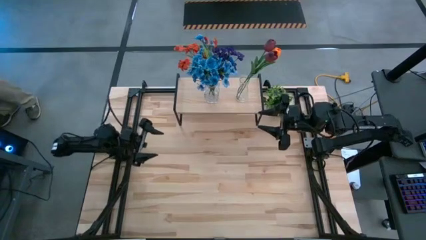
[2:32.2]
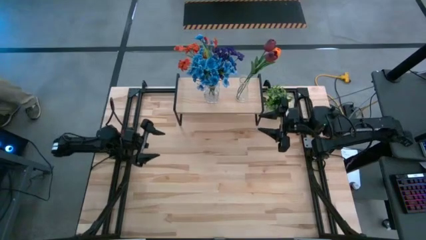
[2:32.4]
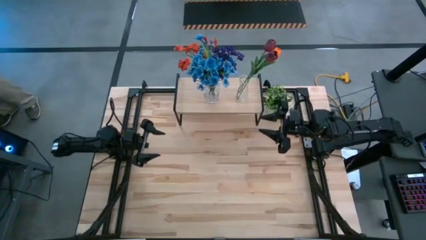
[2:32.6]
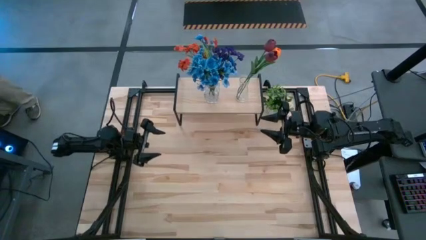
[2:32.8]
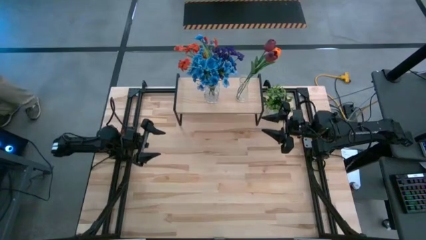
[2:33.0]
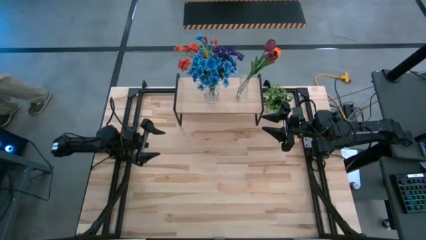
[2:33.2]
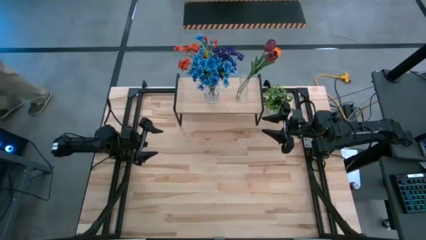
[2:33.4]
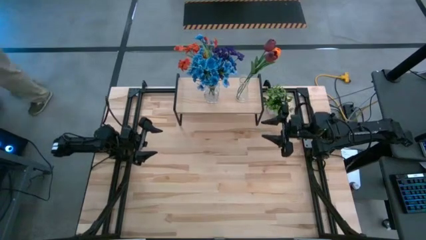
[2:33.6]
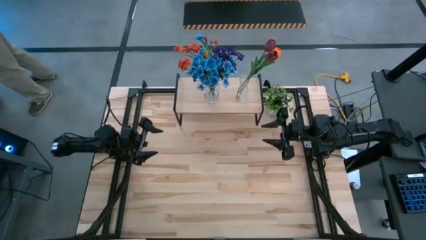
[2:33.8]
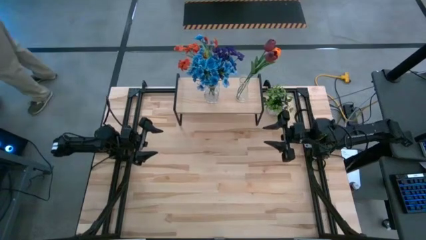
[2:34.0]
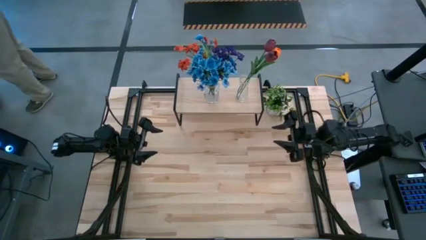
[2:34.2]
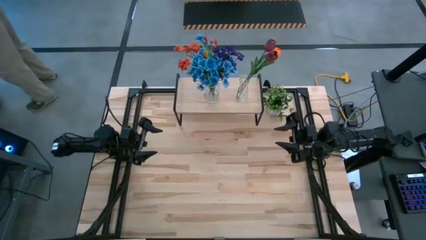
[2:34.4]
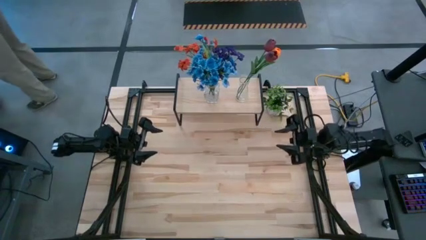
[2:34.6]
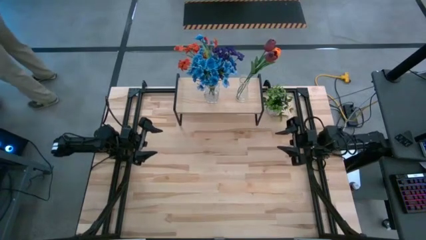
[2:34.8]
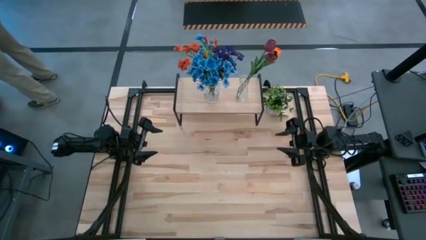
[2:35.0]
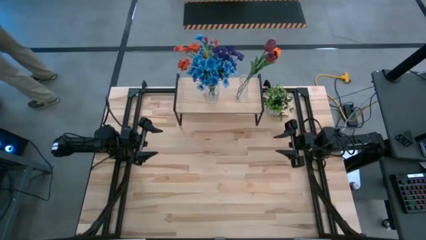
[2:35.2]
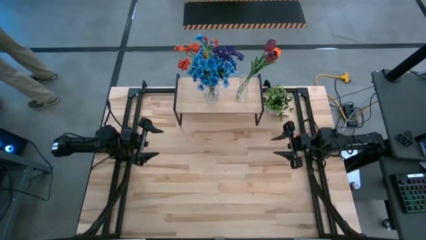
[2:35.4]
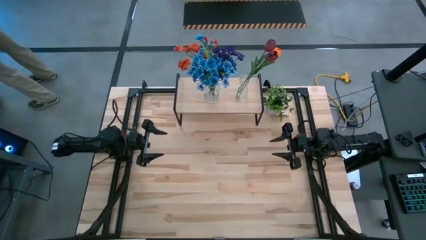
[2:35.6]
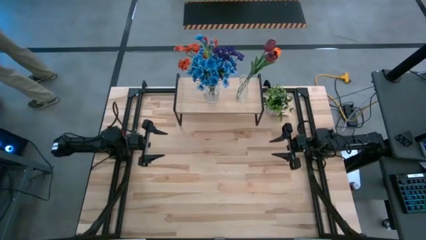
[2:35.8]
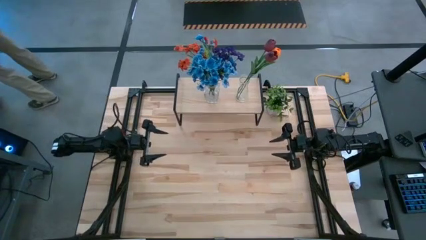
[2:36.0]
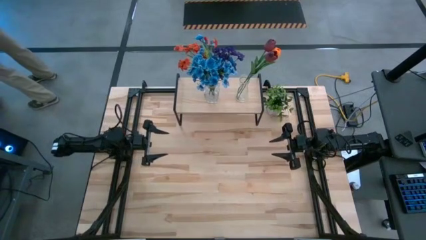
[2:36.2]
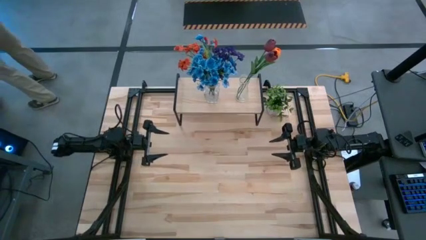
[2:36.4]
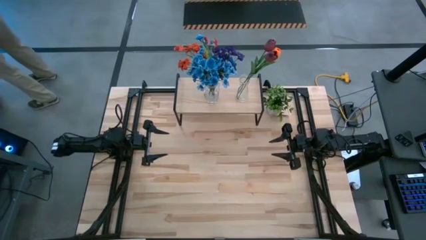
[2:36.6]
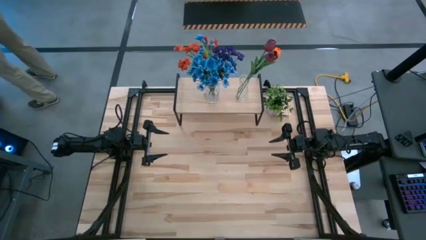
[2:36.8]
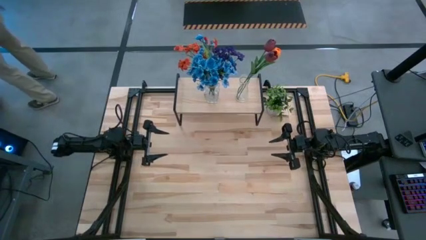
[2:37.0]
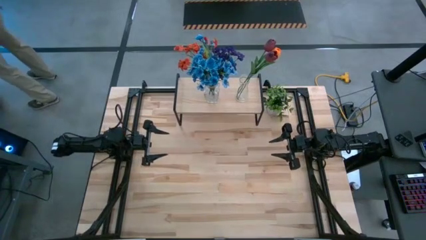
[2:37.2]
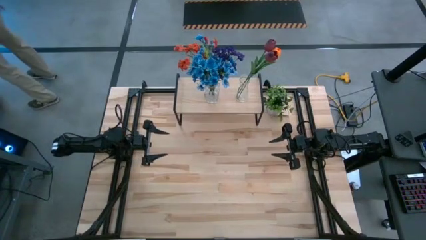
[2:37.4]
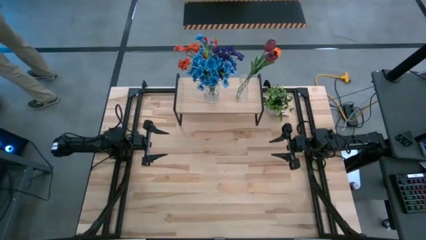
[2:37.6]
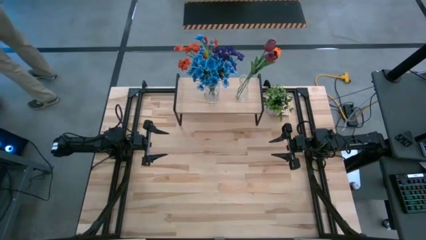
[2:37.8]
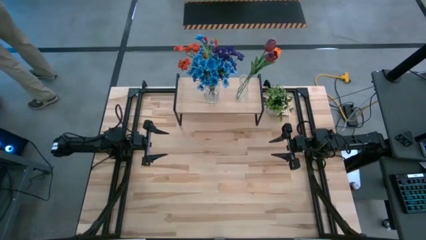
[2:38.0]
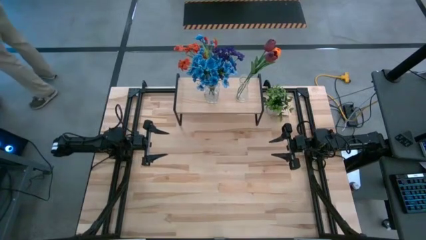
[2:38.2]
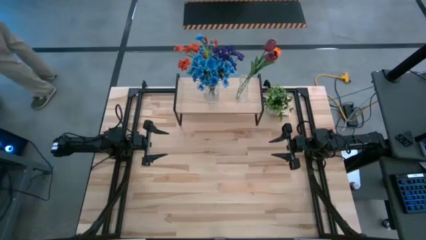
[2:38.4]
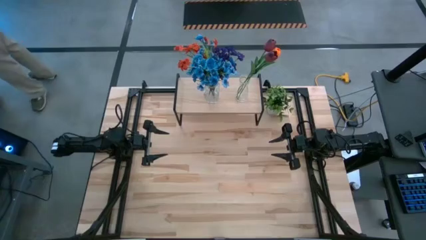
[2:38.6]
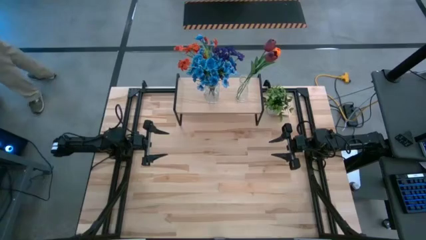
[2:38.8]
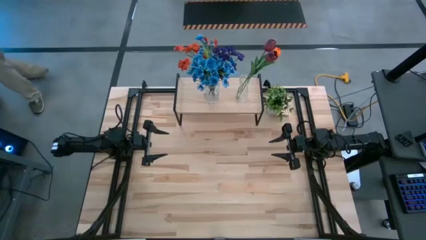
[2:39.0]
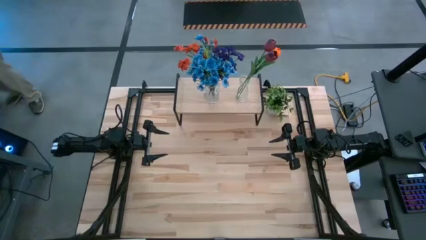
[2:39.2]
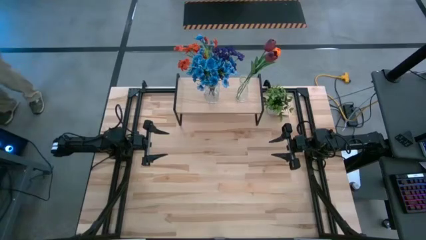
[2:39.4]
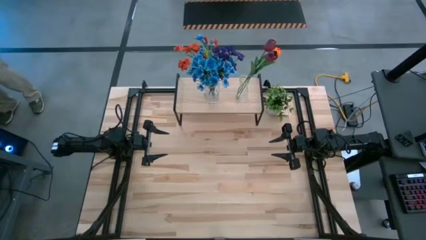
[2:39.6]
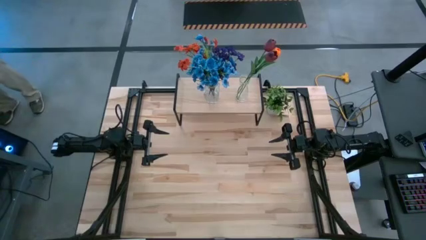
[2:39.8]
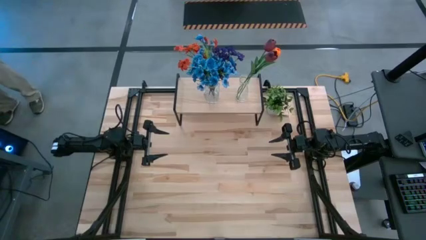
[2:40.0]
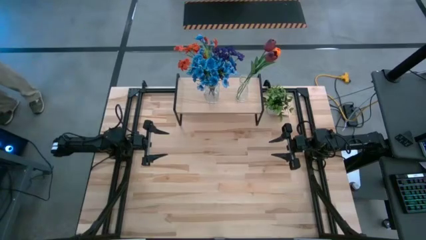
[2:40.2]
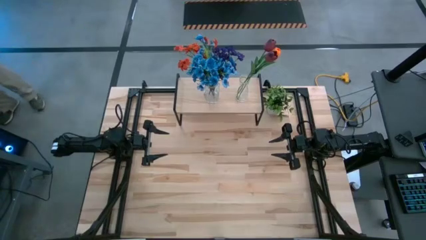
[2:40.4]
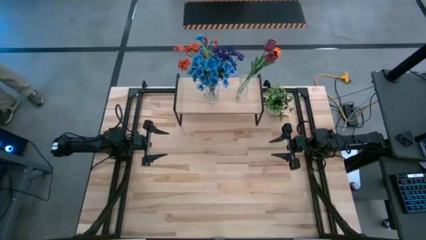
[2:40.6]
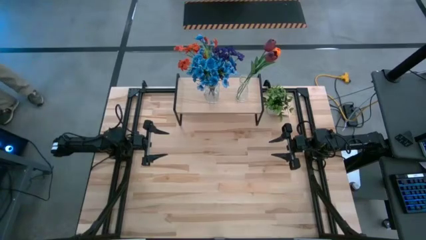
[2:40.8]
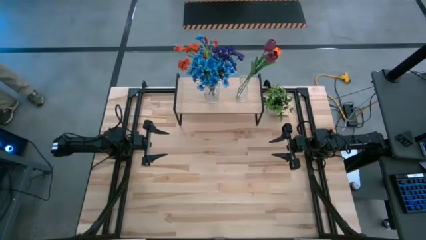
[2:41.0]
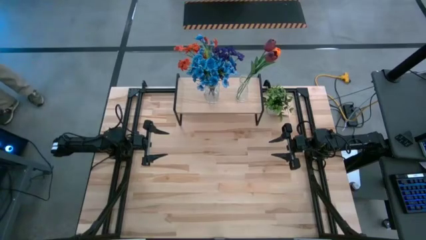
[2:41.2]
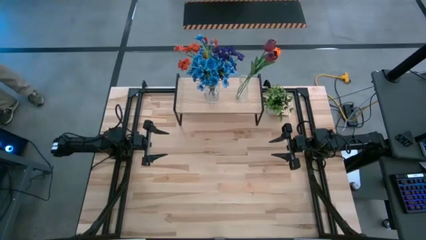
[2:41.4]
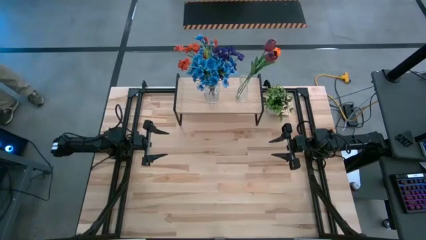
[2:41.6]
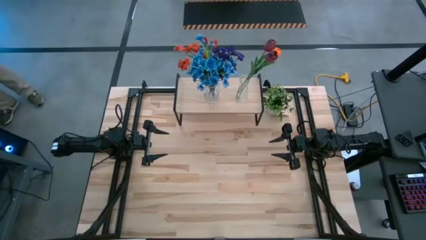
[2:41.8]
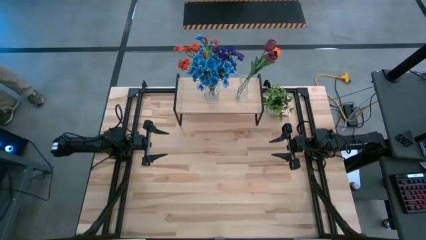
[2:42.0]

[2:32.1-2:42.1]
Task: Pick and place flowers into a vace then onto a shelf
Return to Home Position

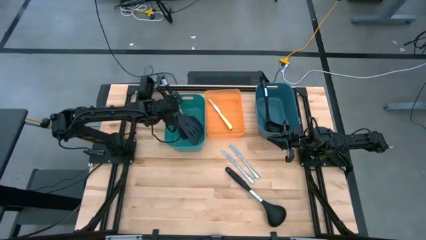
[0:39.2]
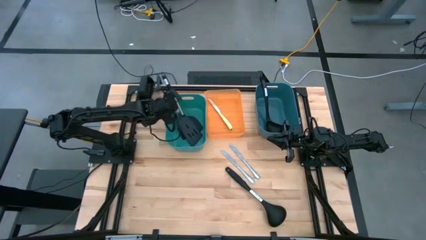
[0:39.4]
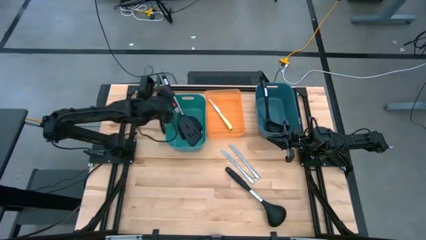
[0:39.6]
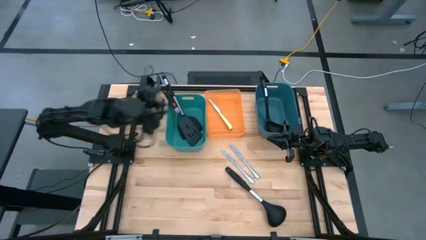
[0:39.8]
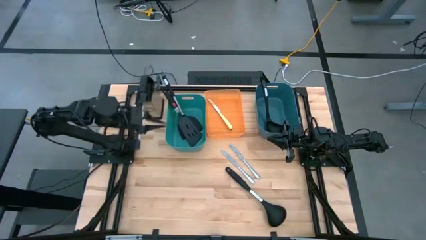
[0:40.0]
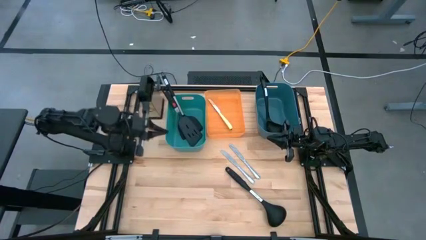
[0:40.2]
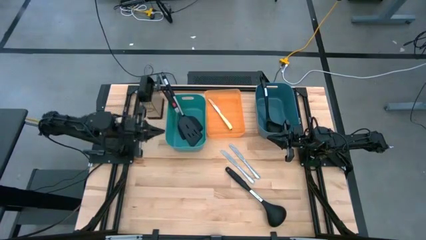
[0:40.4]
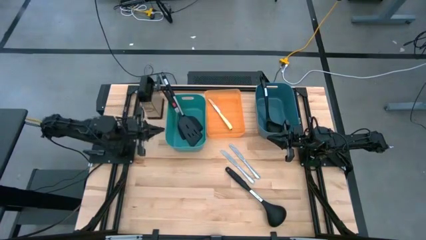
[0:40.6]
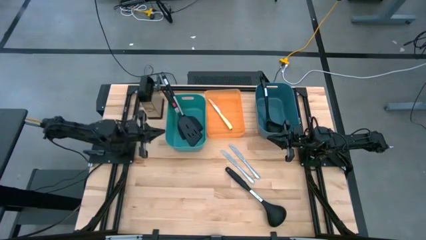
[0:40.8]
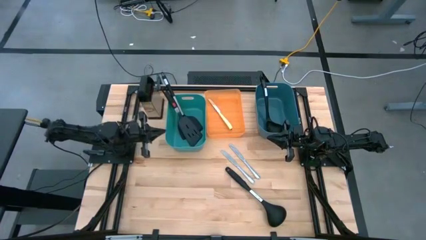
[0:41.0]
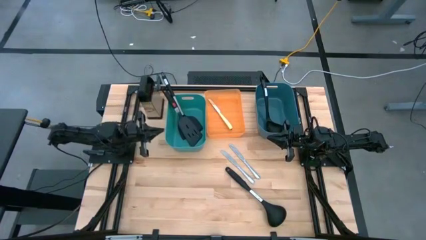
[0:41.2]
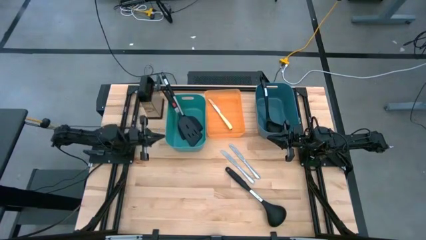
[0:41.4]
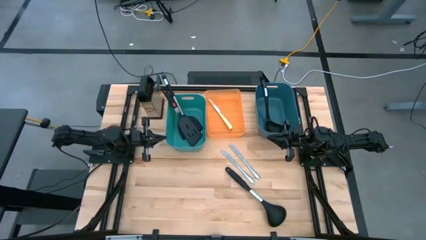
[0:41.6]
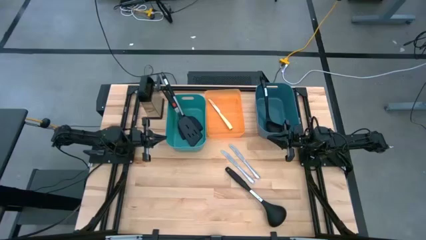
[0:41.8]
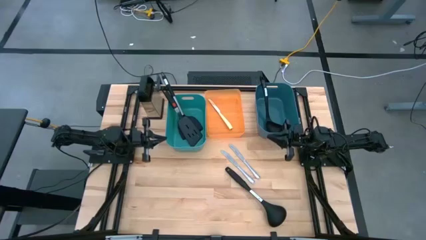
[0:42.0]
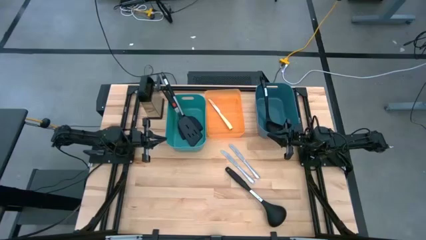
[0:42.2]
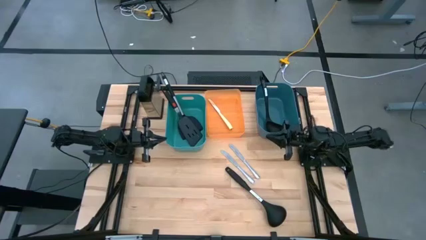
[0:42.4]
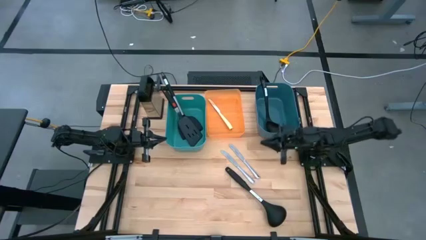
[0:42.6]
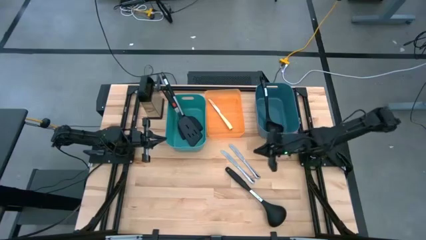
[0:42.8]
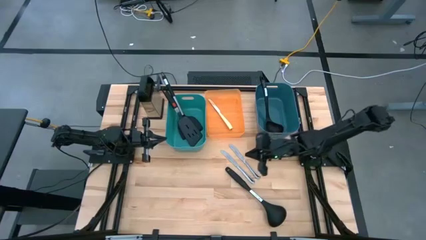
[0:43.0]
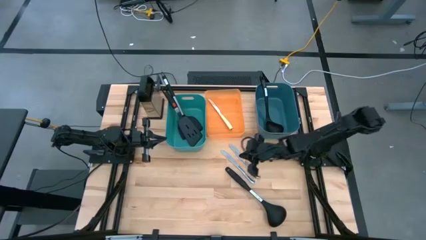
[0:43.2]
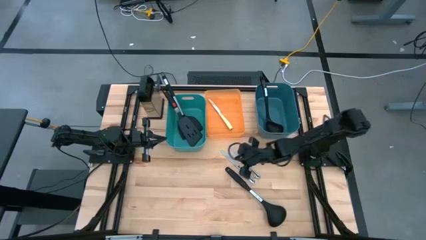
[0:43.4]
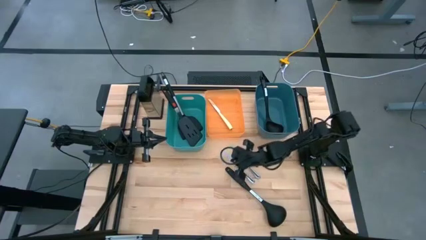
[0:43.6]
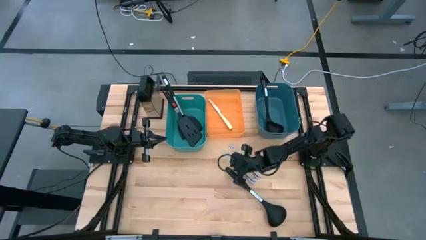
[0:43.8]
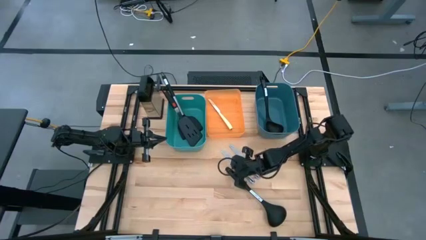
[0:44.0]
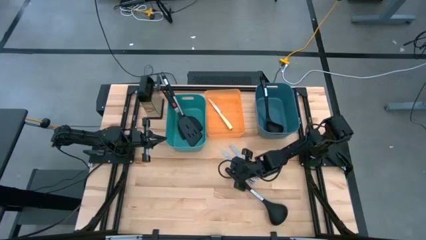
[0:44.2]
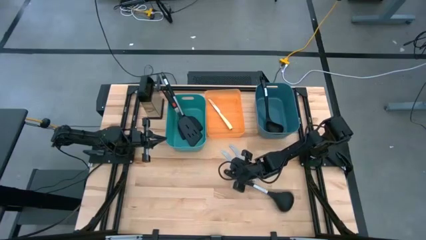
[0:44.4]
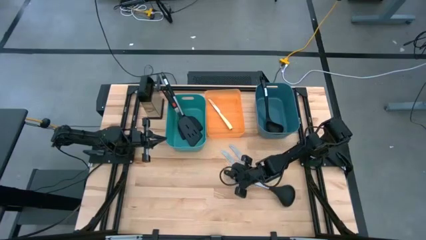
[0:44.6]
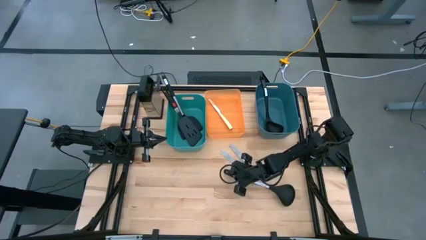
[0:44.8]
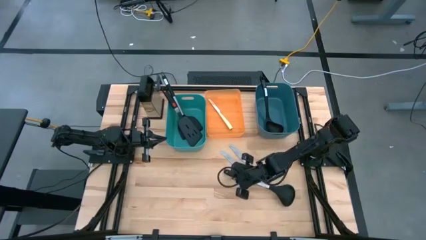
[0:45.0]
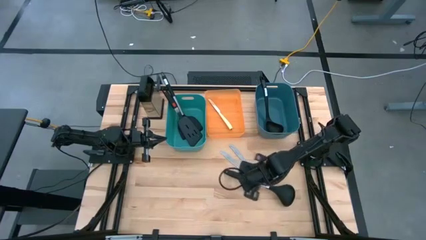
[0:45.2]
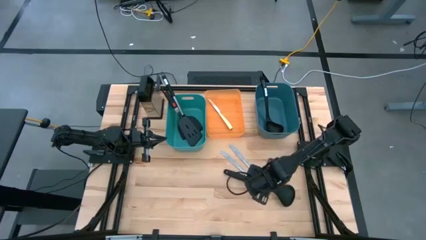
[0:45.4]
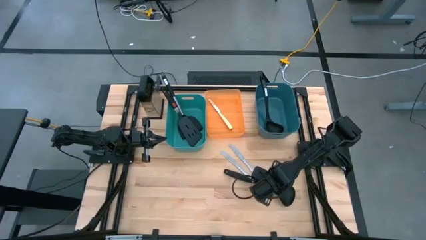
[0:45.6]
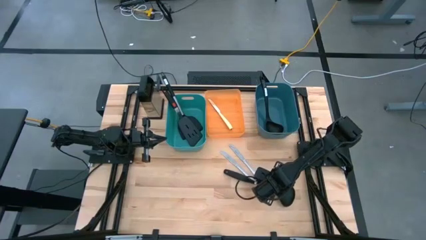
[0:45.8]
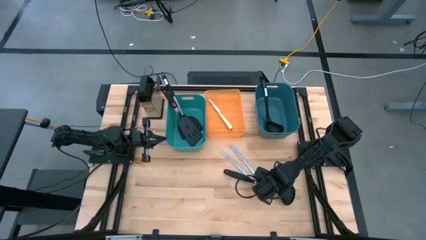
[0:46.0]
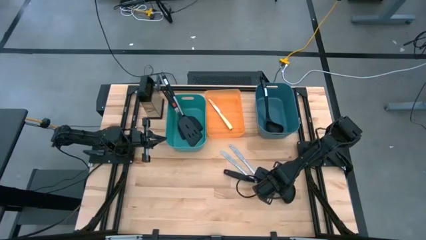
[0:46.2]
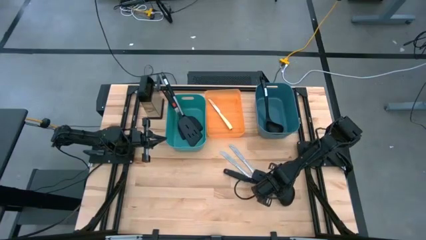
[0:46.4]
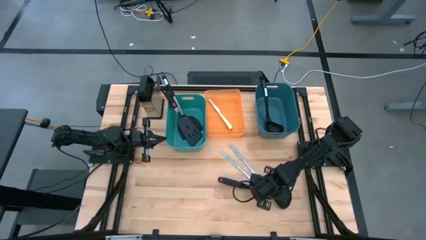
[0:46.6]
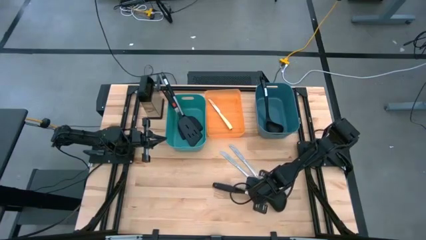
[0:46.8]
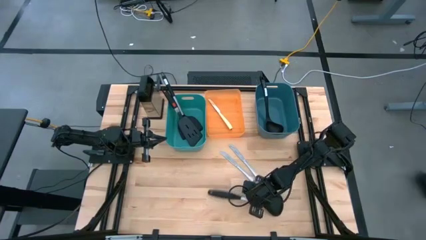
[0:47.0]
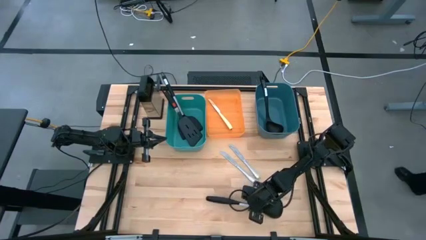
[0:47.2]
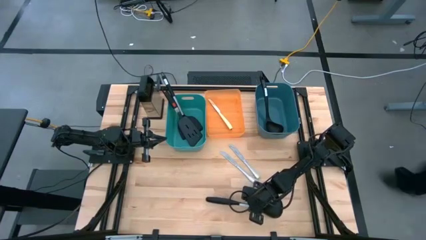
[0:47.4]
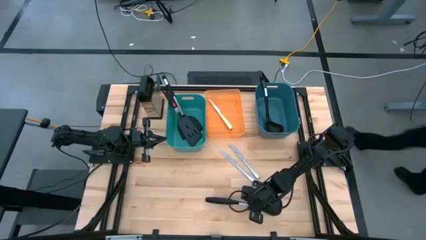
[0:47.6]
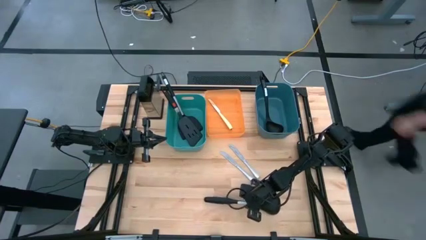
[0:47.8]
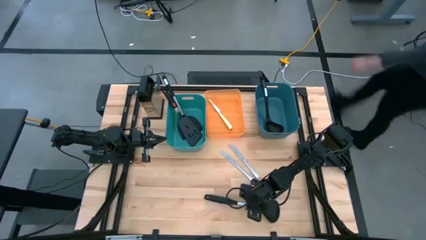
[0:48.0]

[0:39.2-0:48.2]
Task: Pick & Place Kitchen Items
Adjust the black spoon
